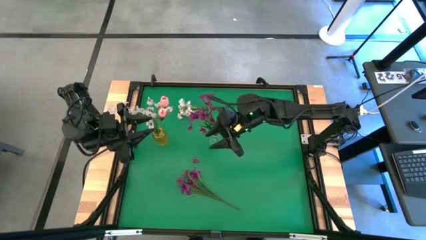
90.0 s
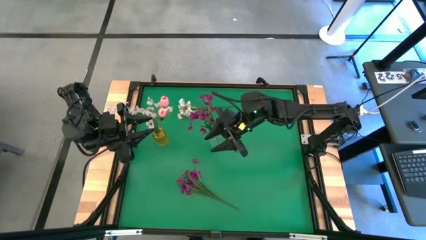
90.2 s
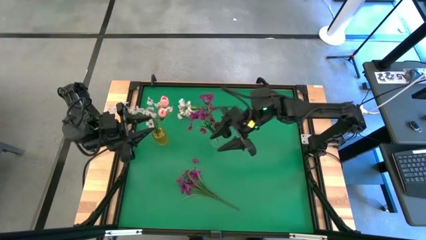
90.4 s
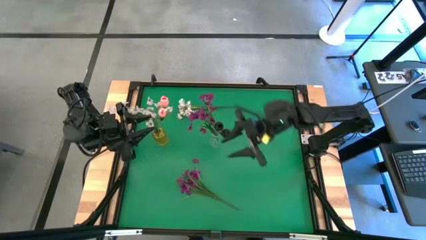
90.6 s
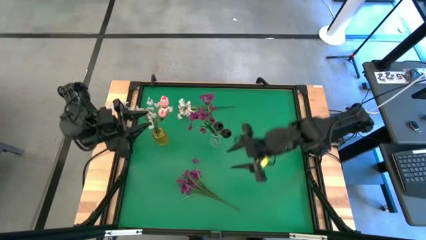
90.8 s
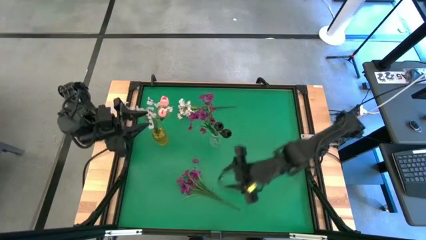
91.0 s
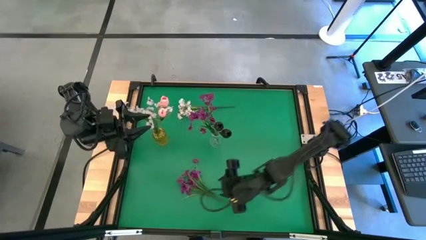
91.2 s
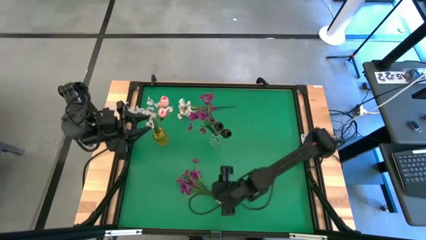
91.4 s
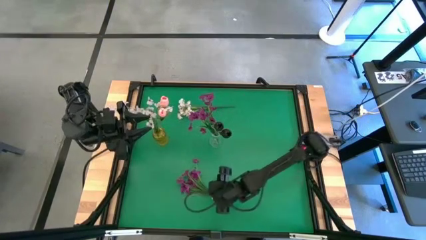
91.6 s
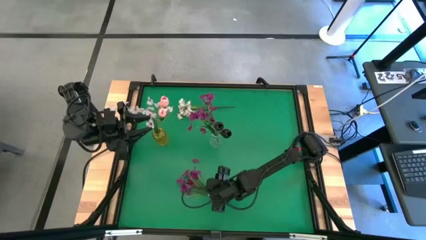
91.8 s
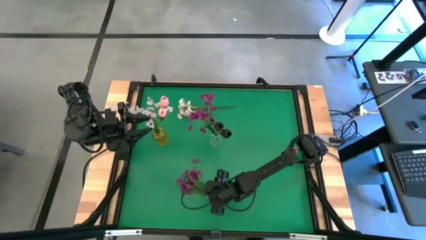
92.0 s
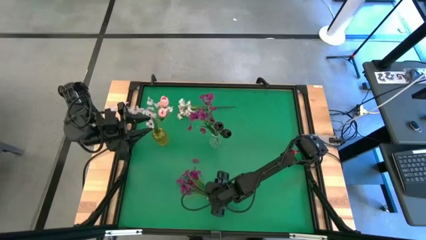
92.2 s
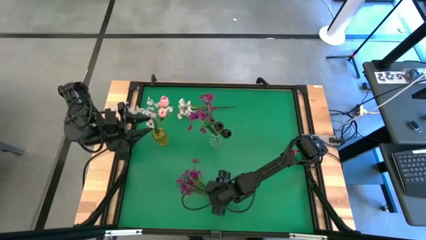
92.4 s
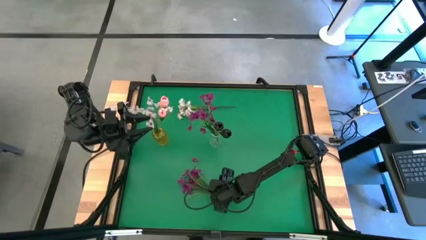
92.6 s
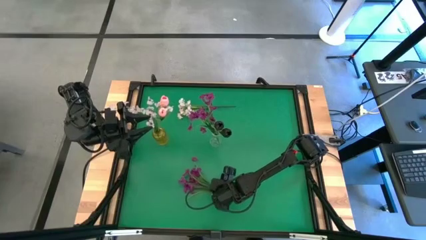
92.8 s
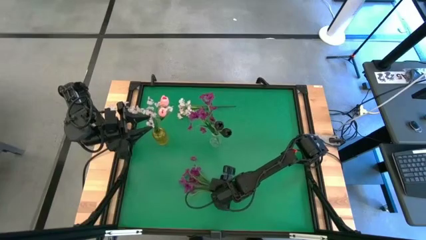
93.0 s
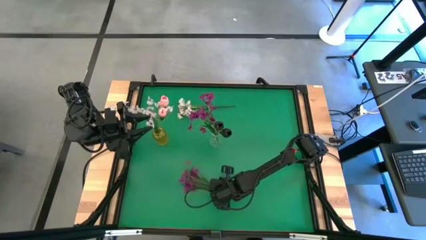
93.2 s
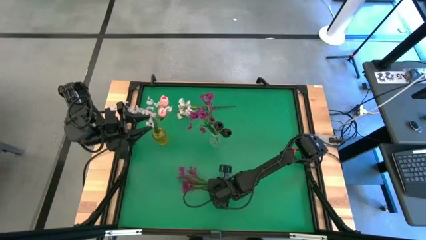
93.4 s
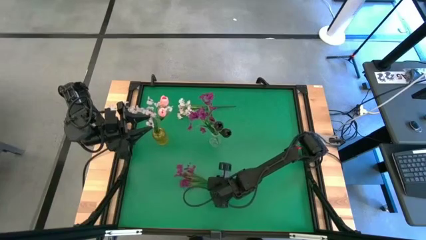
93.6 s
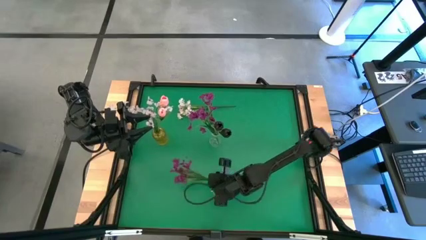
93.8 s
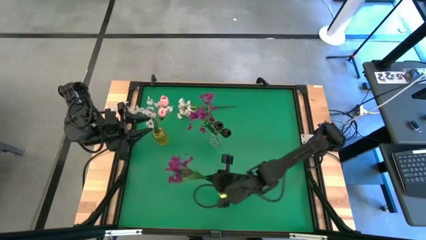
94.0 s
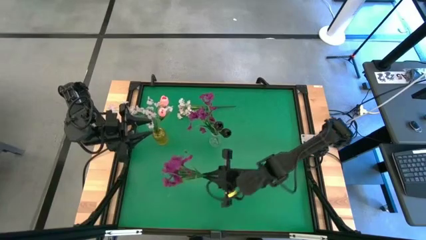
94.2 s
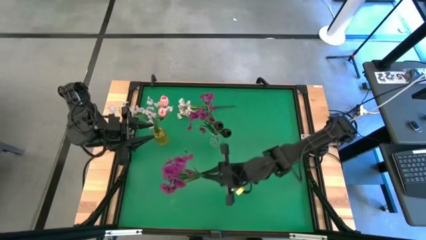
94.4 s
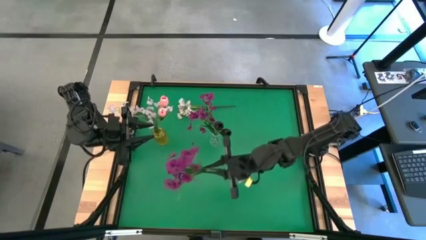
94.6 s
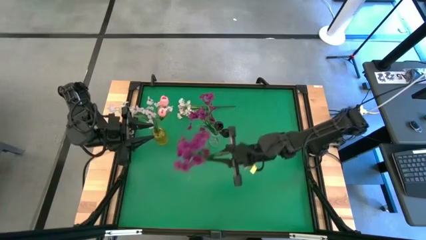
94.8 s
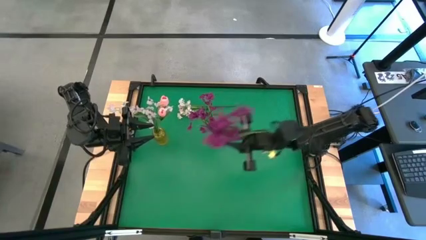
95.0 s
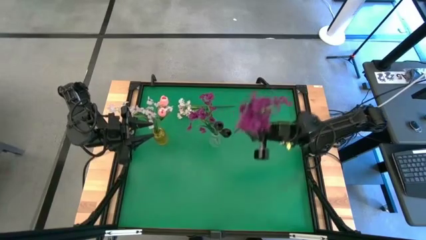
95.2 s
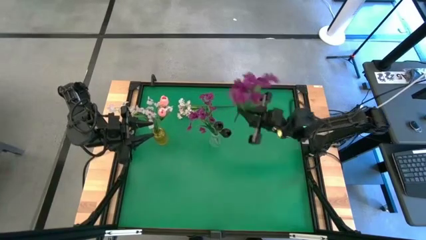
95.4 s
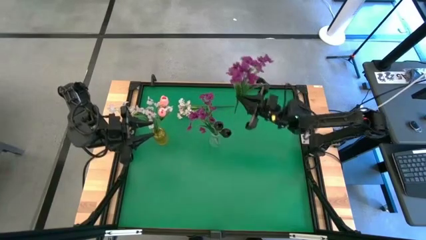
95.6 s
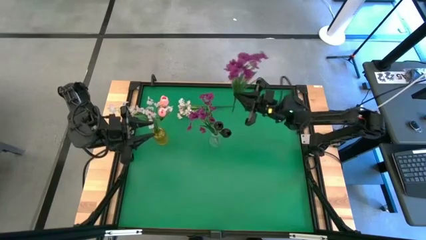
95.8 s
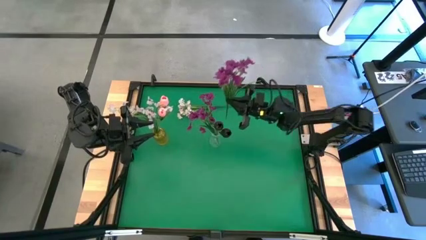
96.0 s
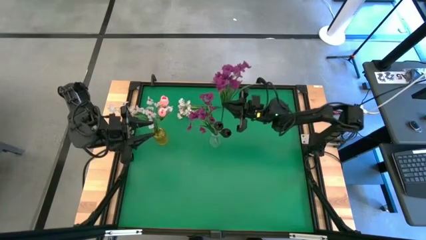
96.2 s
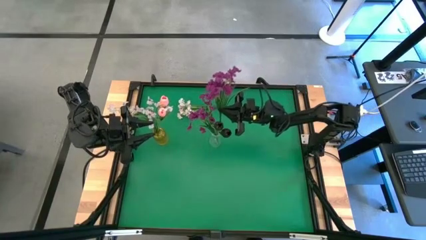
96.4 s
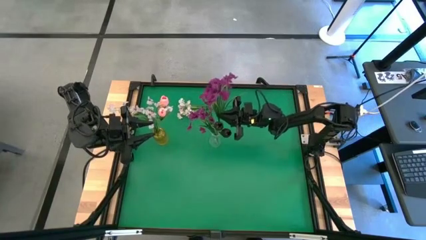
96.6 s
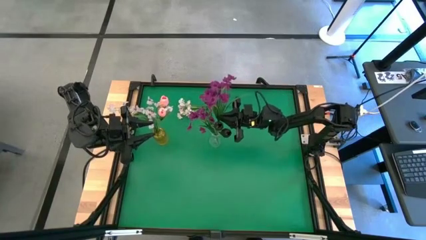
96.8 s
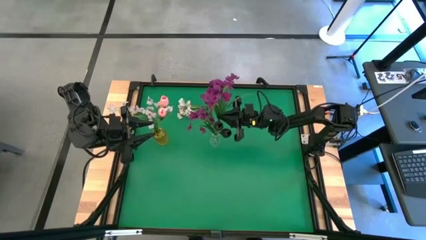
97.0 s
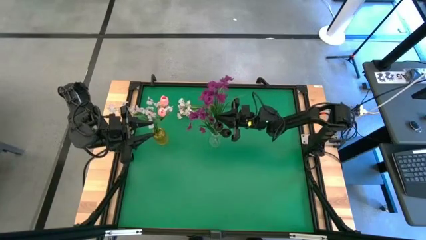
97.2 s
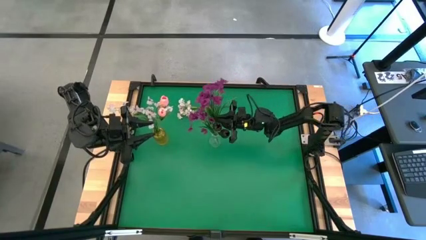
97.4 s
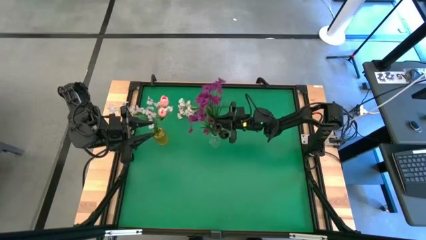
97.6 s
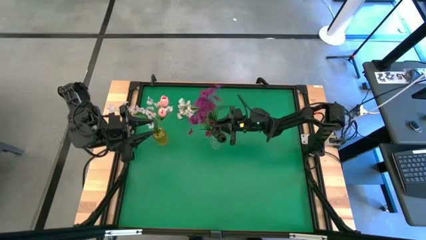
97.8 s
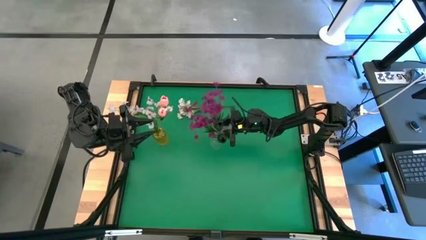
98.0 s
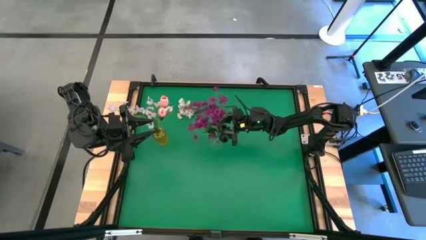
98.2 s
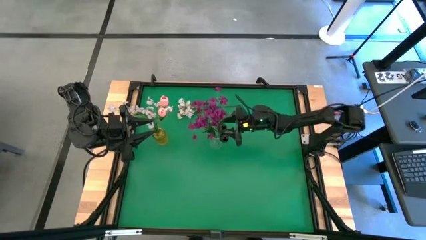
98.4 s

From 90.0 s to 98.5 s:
Task: Sort flowers into vase by color
Put the purple flowers into the transparent vase

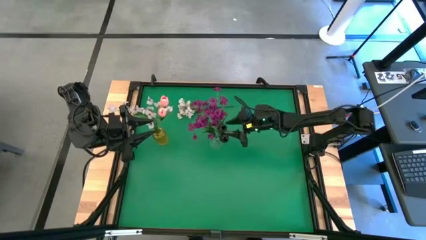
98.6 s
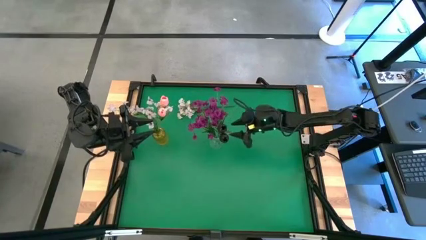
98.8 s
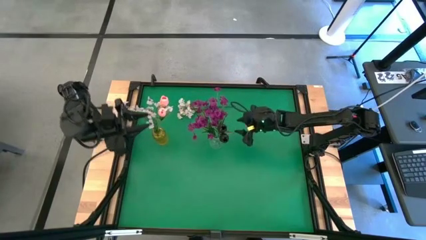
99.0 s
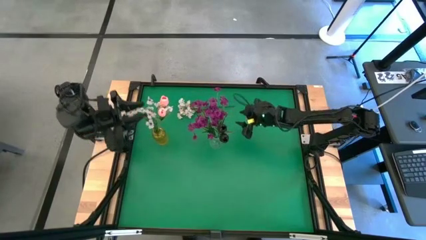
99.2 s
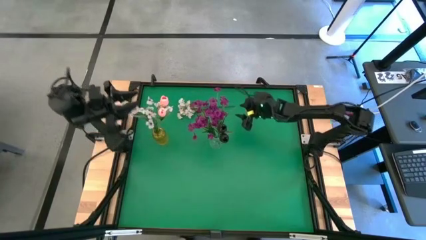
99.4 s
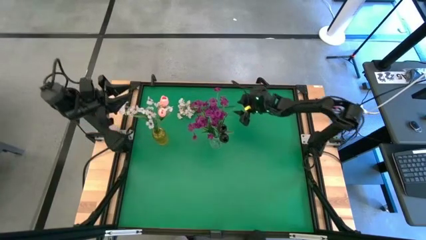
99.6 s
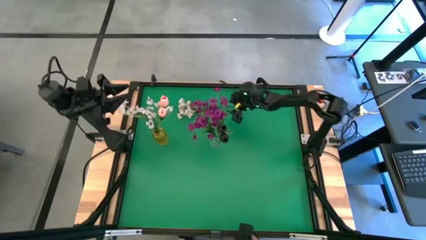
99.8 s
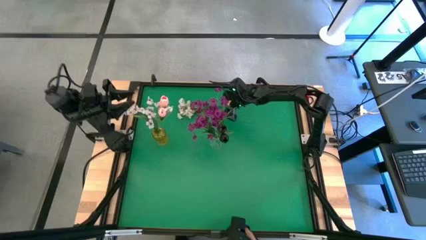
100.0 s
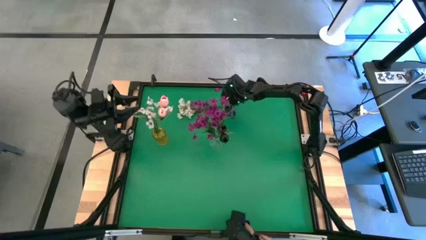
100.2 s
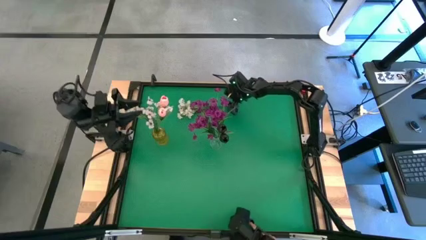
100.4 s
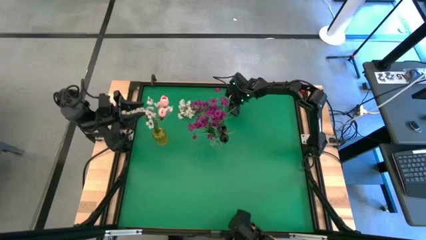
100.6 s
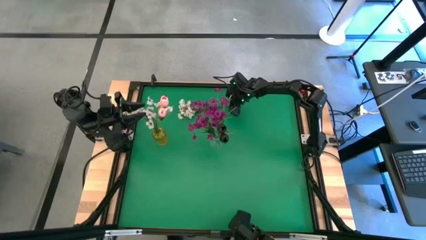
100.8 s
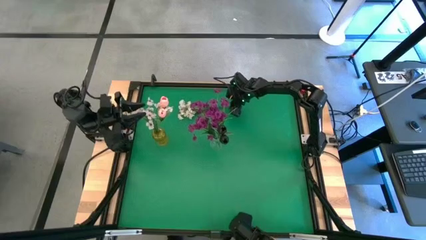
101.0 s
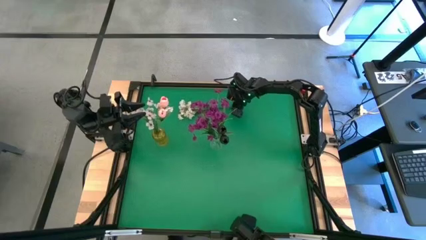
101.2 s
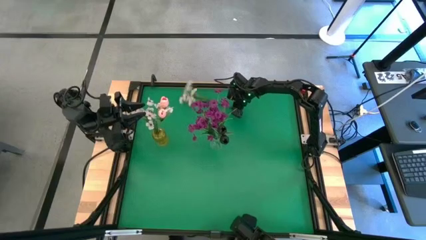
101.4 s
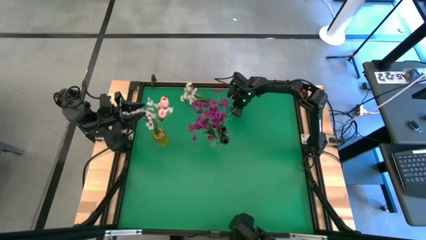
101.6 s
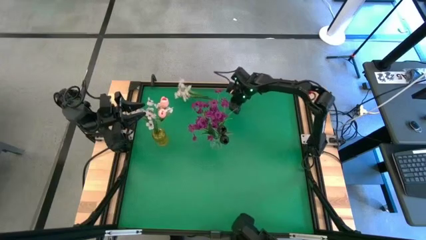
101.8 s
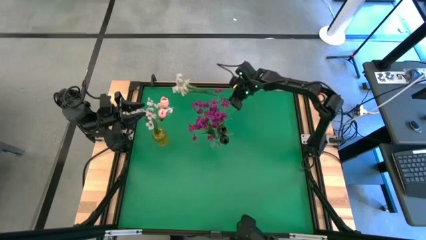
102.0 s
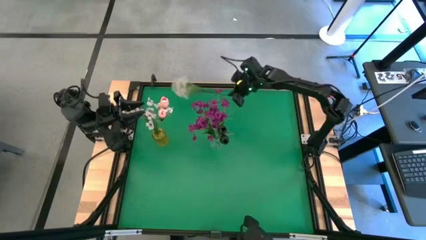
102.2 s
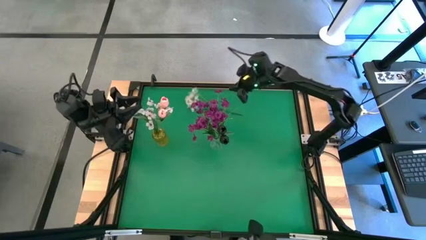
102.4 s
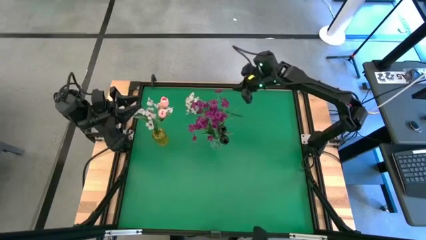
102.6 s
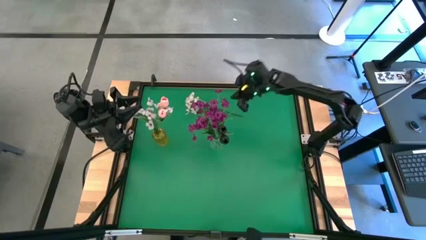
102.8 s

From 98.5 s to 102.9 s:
Put the white flowers into the yellow vase

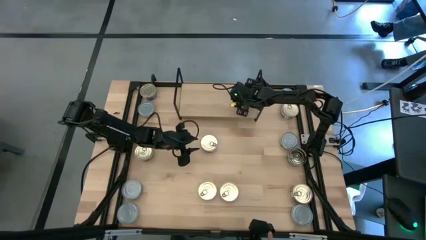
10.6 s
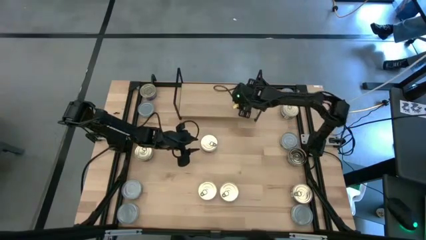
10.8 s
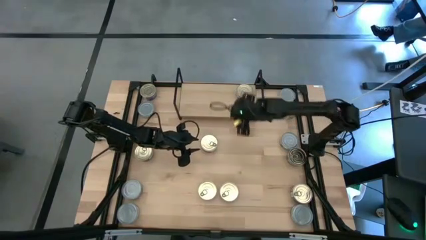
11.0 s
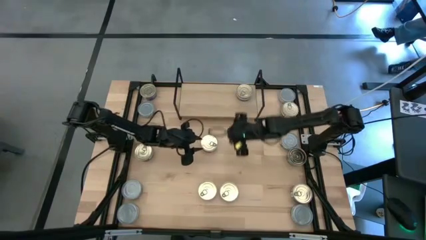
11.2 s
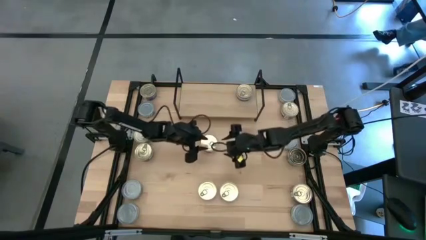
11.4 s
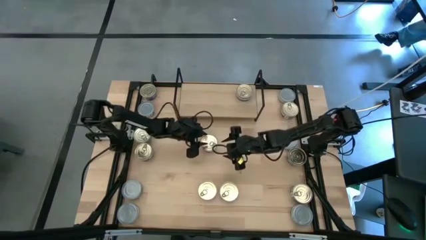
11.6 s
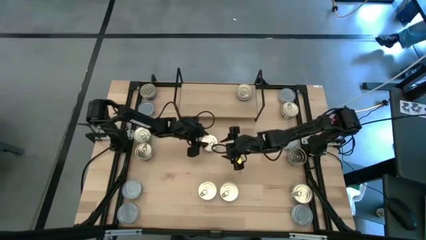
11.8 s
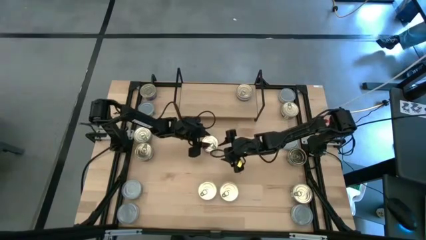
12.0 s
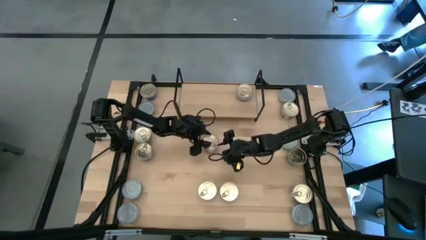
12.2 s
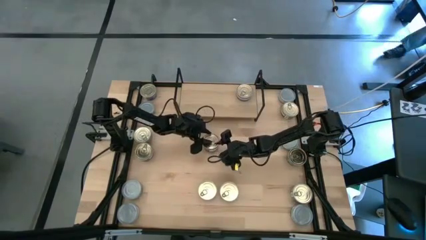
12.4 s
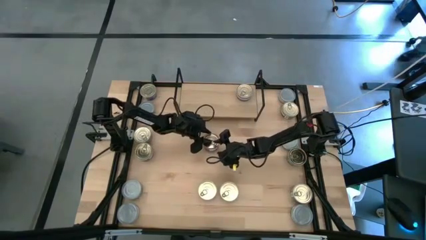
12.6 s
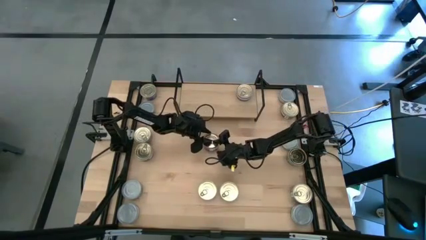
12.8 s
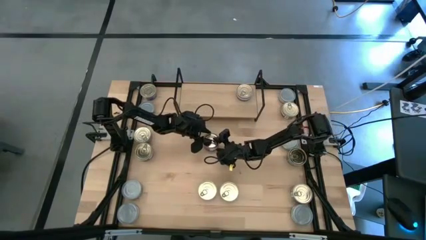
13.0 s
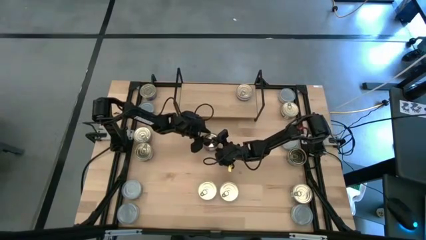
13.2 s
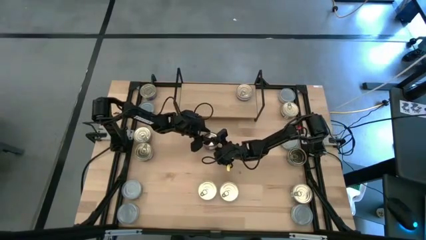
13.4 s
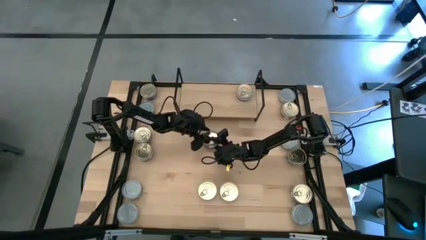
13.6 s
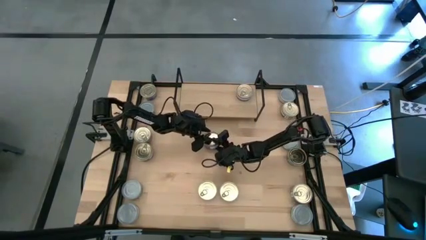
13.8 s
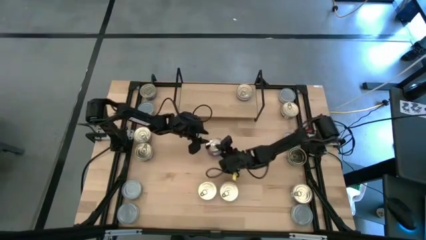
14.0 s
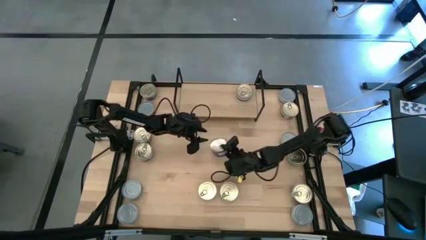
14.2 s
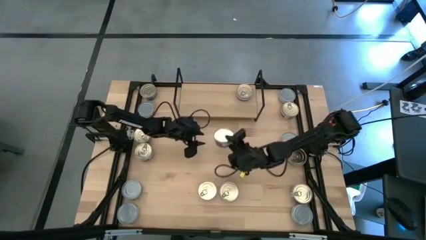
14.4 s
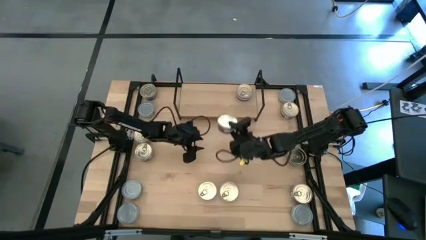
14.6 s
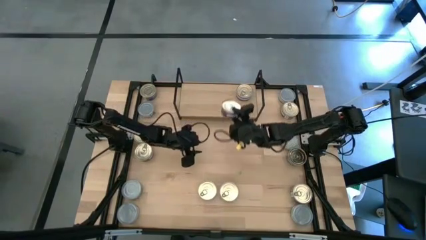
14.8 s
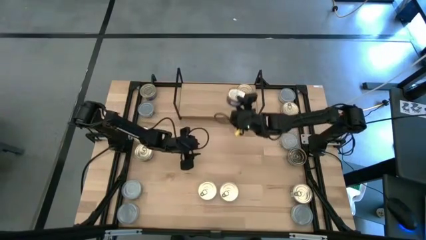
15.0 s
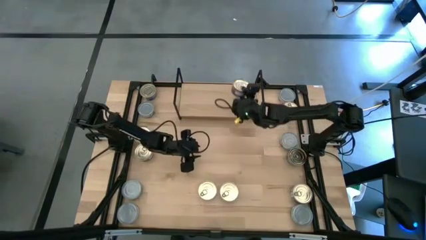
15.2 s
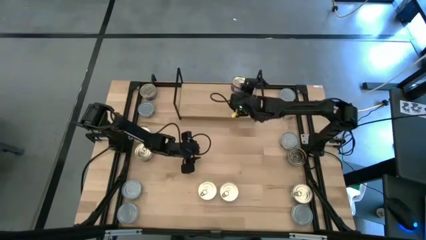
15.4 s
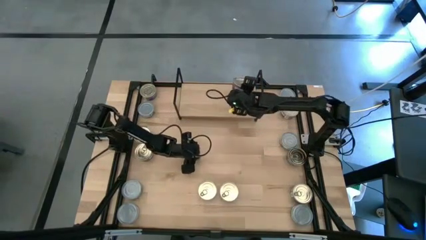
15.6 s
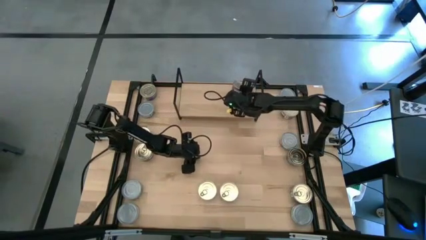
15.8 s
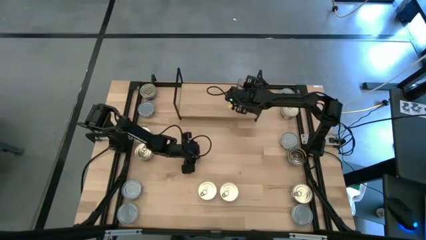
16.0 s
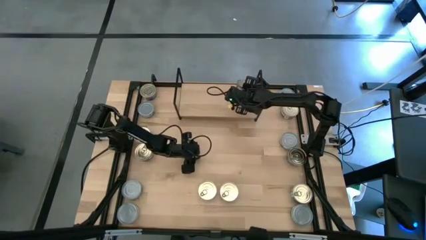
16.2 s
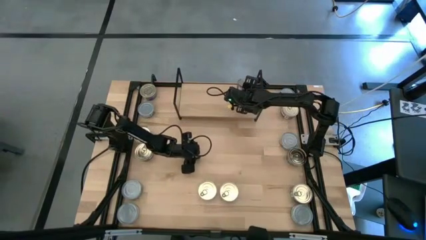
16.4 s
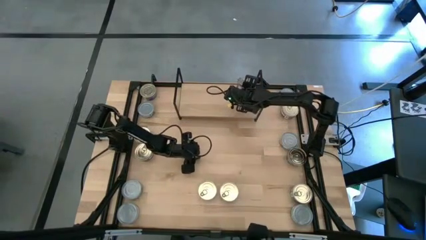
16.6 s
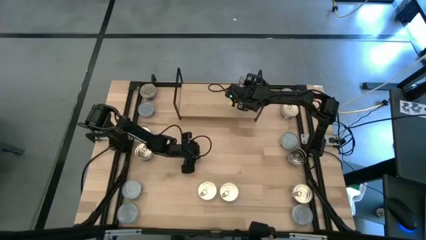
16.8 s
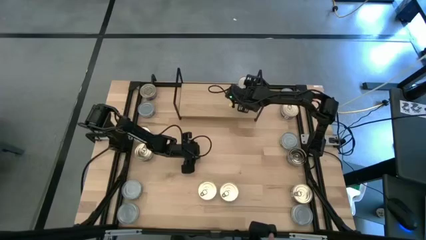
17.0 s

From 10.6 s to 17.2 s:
Task: Stack canned seafood by type on shelf
Stack the blue and pink tuna can on top of the blue and pink tuna can on the shelf
